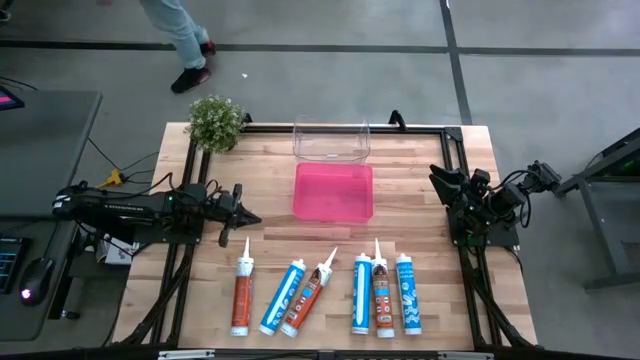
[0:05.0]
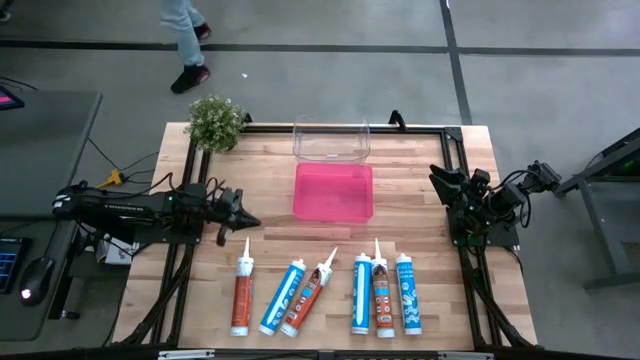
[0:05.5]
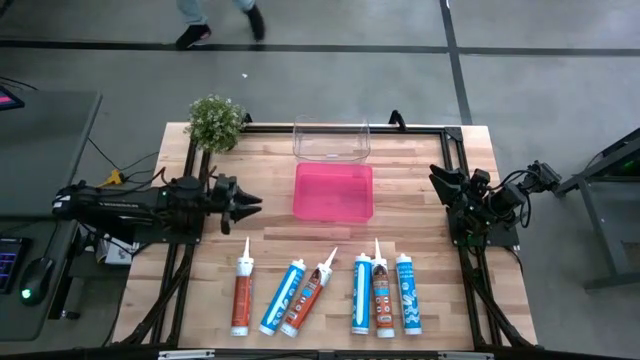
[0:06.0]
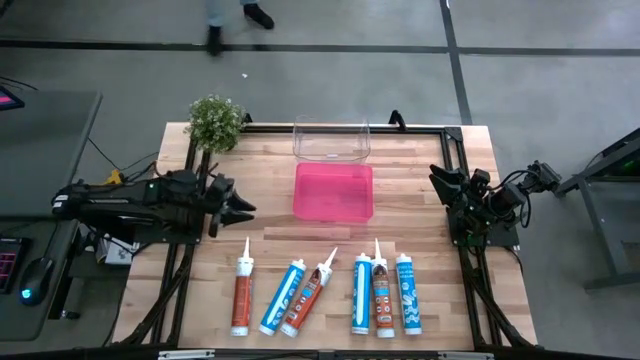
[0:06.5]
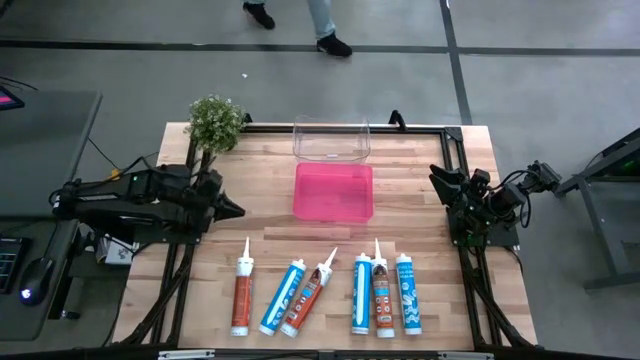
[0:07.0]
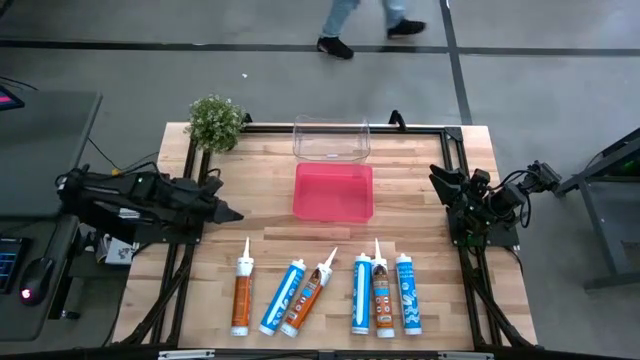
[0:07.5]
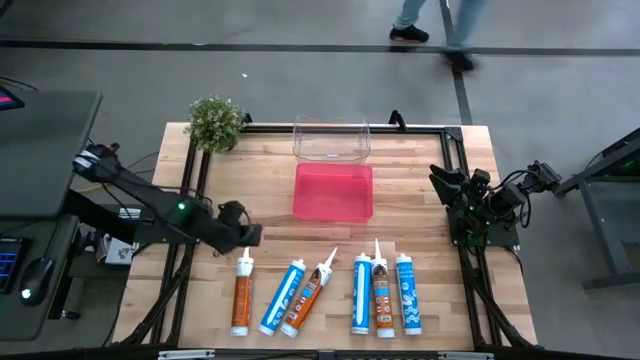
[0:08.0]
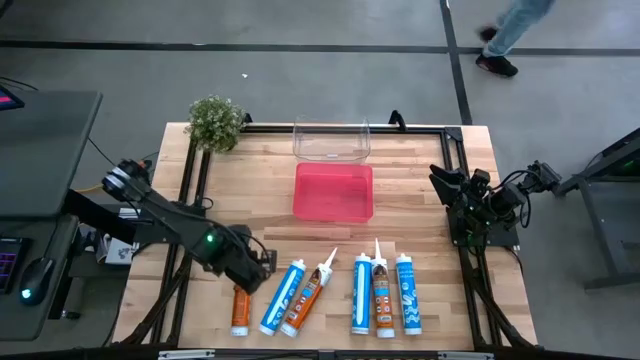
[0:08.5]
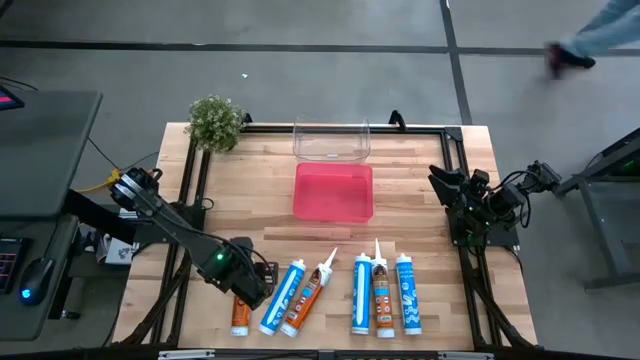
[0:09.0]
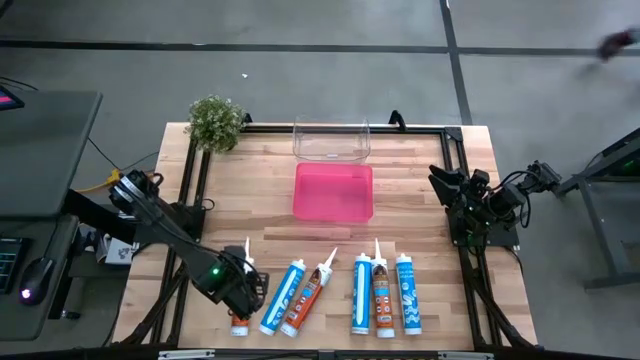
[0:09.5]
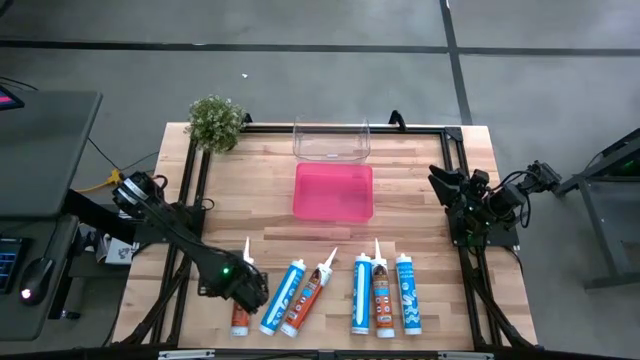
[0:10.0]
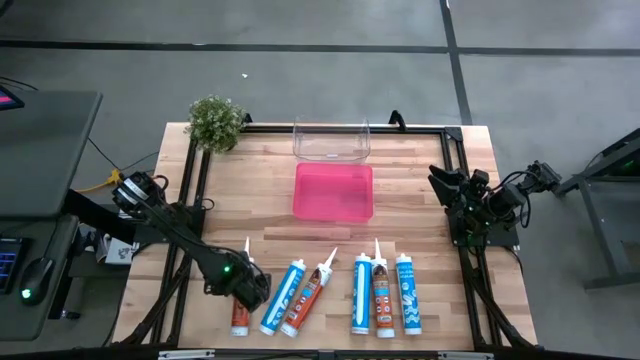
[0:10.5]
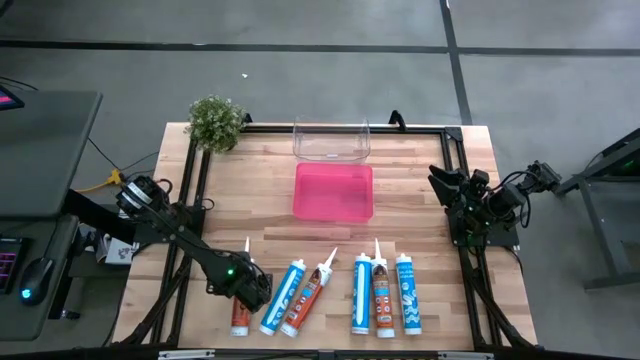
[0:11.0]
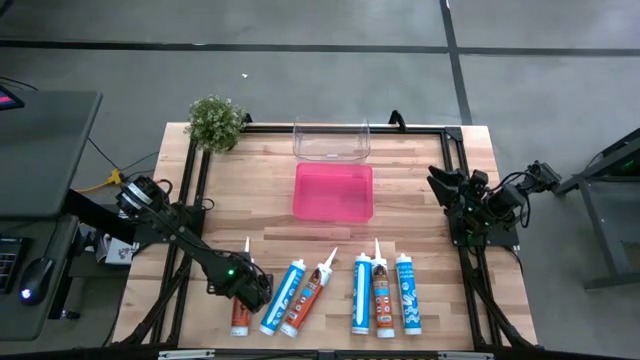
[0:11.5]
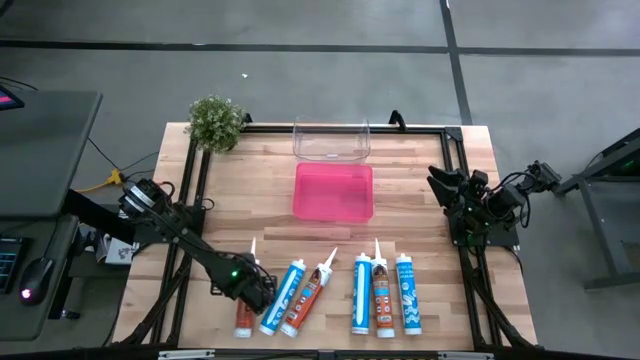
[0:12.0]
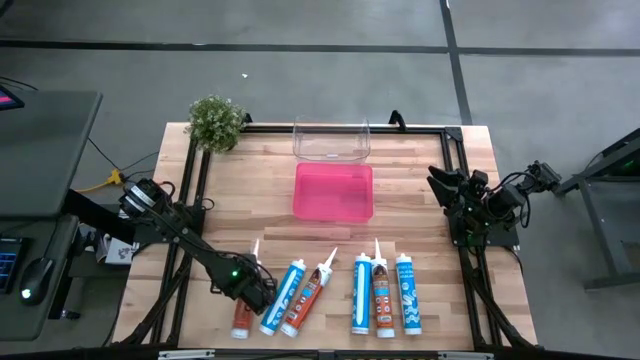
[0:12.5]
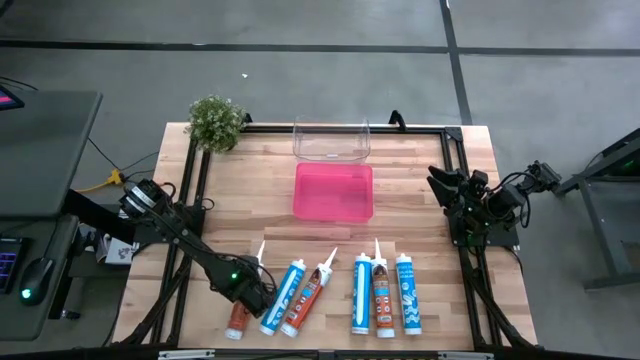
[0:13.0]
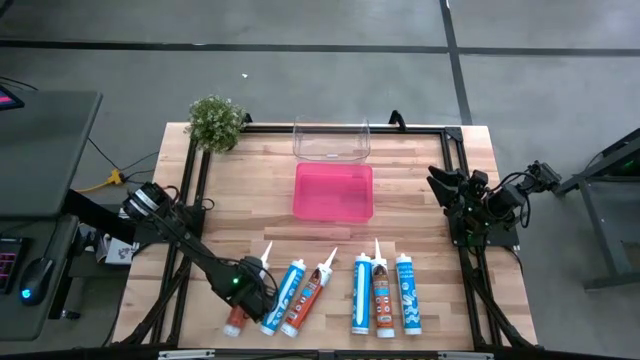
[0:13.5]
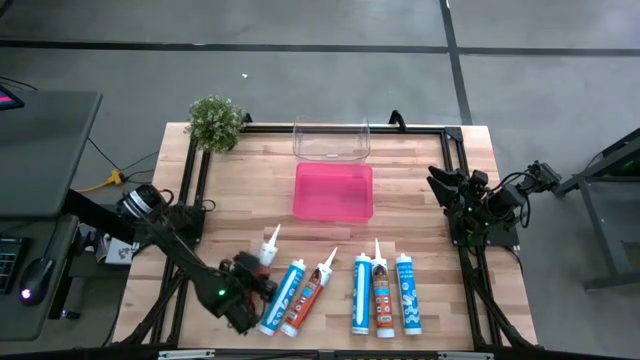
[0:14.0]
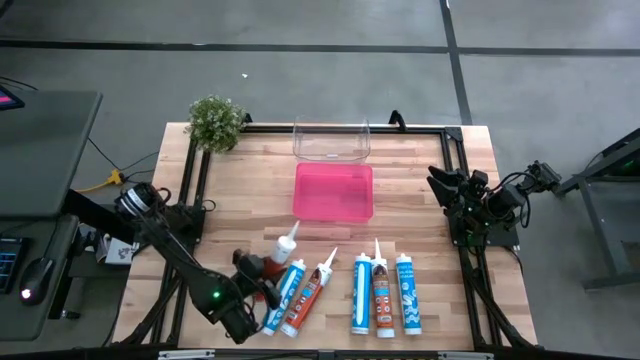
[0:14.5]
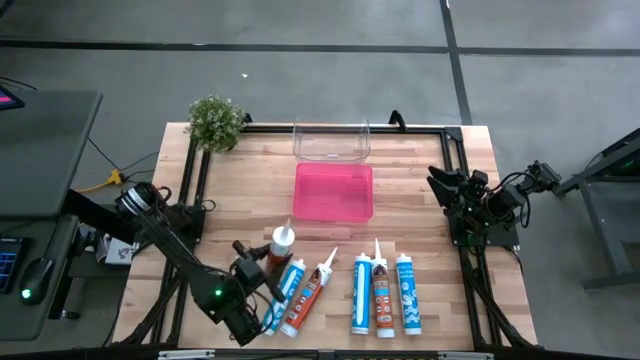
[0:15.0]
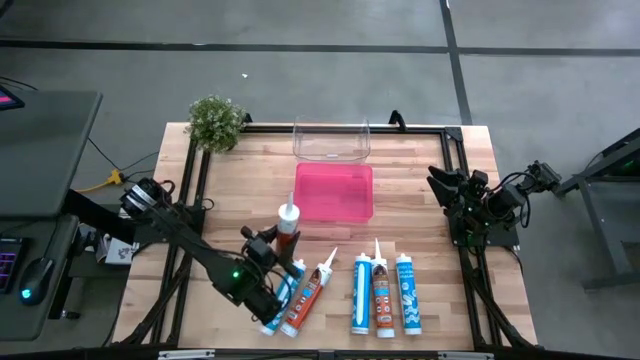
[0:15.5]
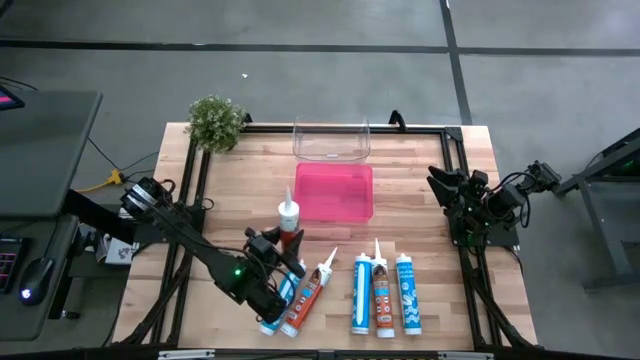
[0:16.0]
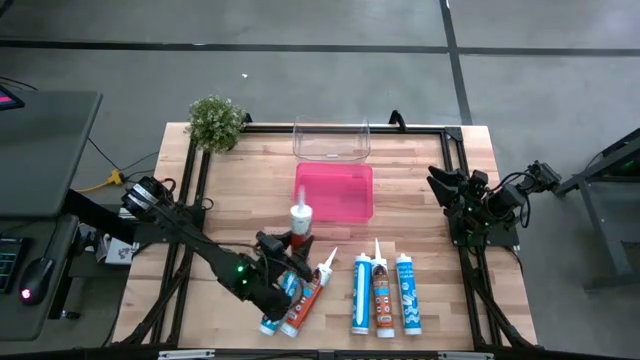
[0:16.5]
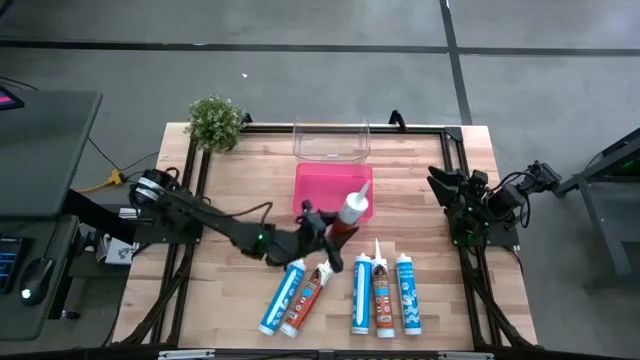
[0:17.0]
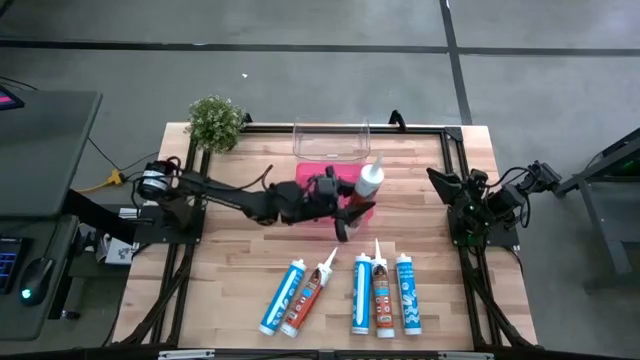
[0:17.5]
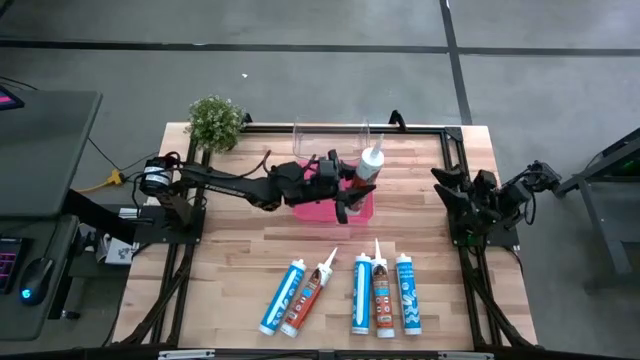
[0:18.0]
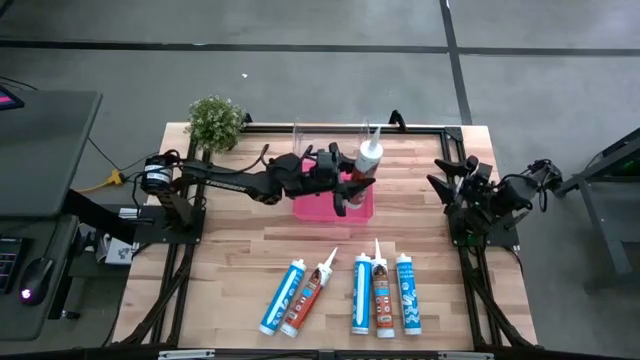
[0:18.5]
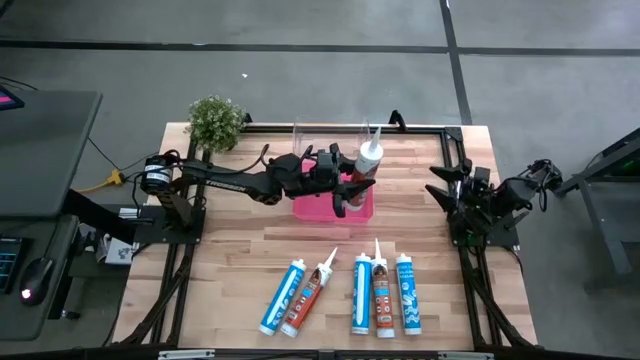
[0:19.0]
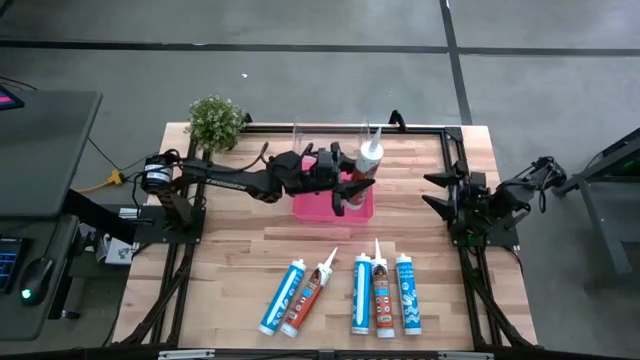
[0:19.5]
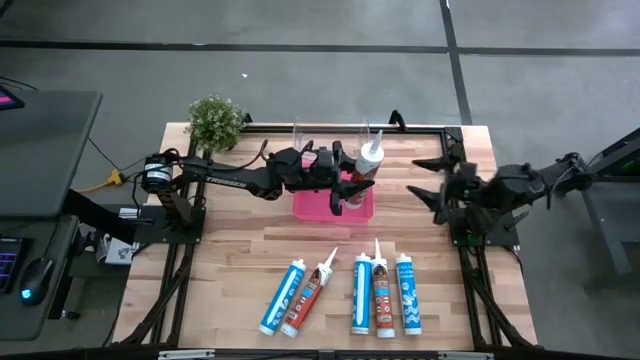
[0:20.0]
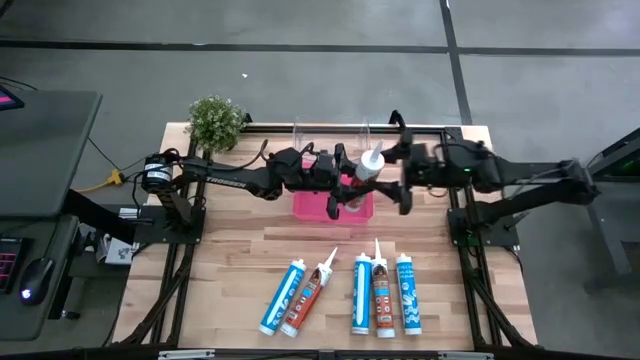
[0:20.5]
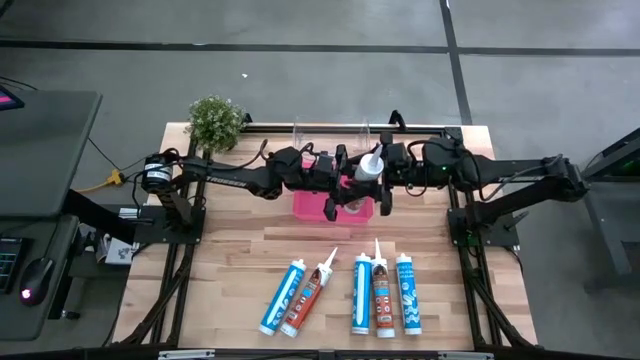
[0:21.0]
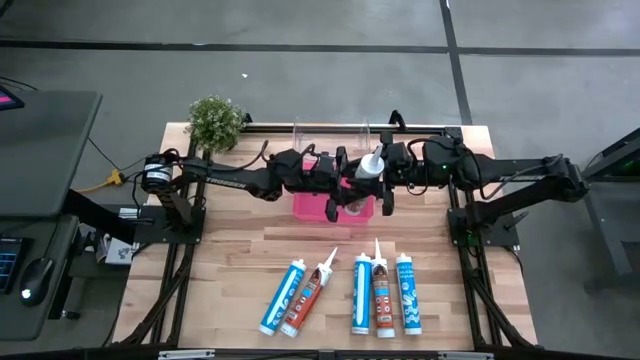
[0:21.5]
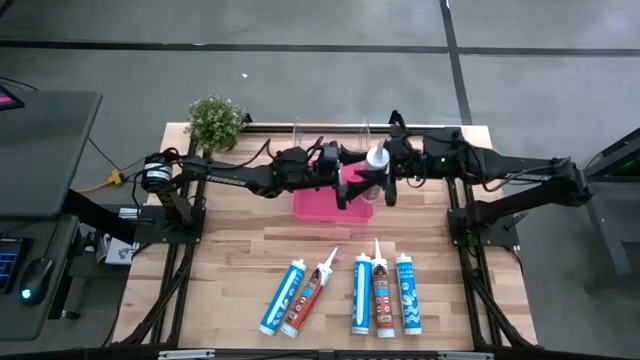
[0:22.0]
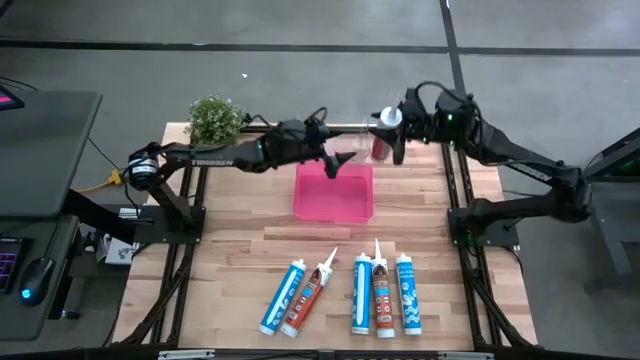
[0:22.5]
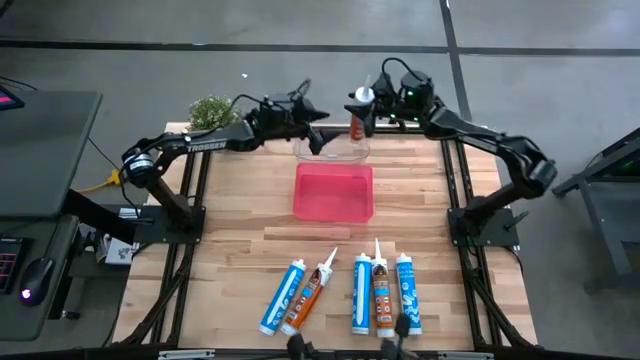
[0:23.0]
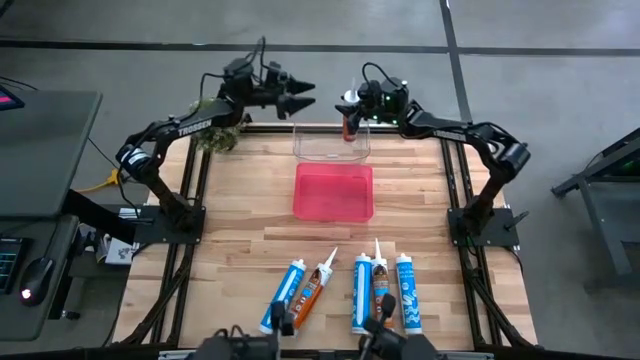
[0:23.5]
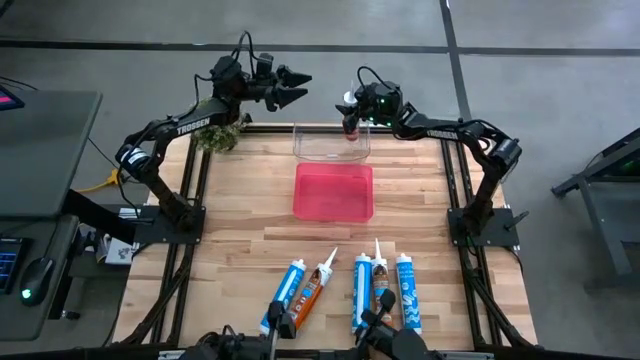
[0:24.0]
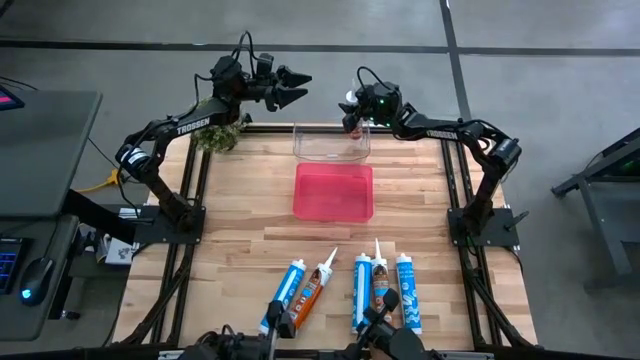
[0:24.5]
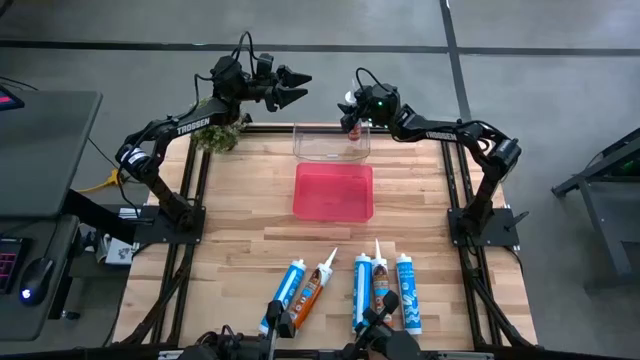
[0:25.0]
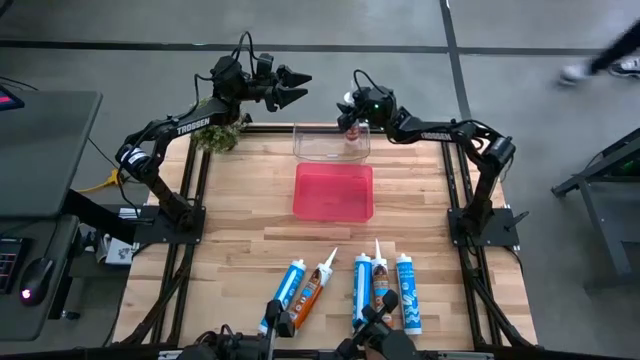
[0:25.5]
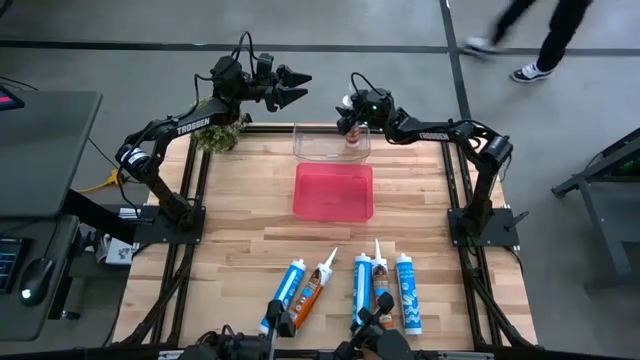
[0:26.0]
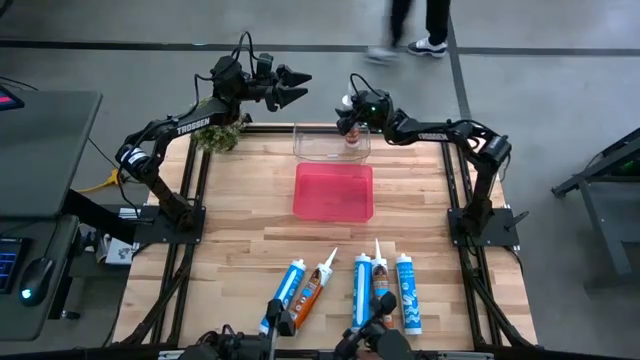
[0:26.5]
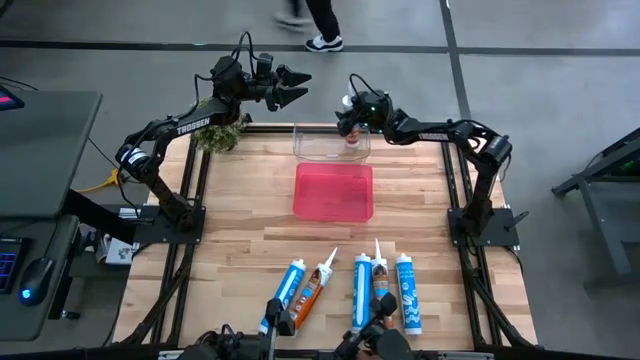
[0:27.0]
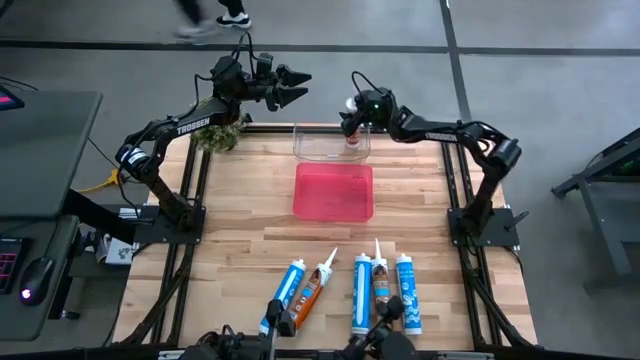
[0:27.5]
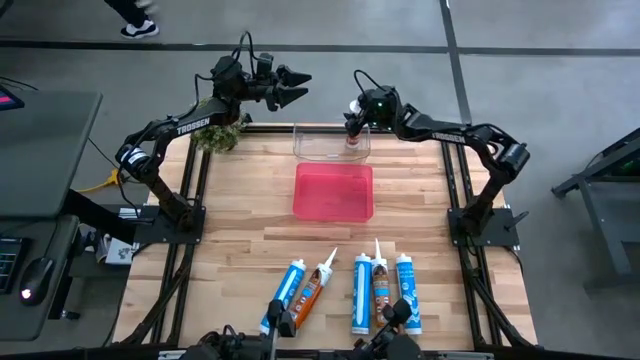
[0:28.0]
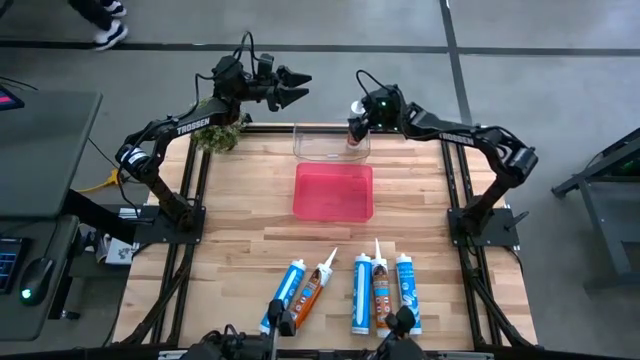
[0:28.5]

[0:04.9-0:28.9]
Task: Pick & place silicon tubes, Sealant and Lysol wipes
Put the left orange sealant into the transparent container
